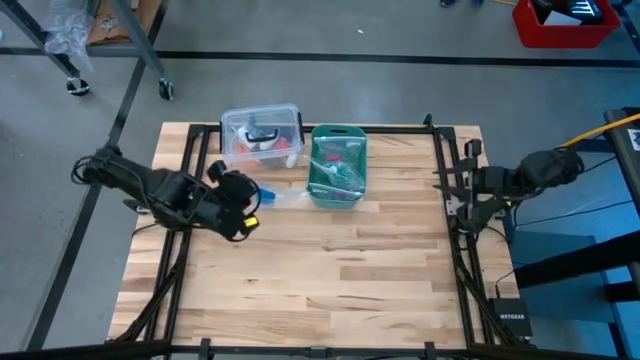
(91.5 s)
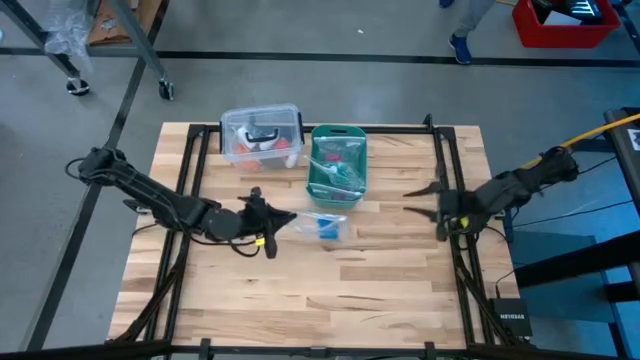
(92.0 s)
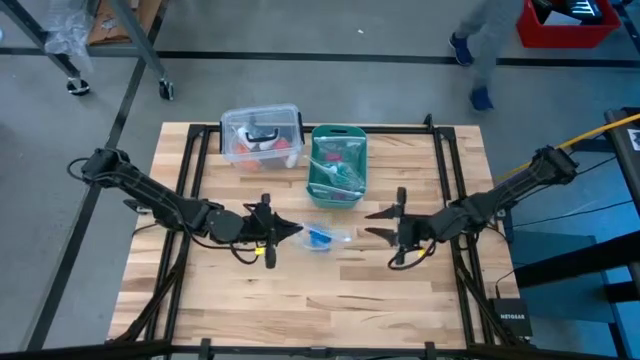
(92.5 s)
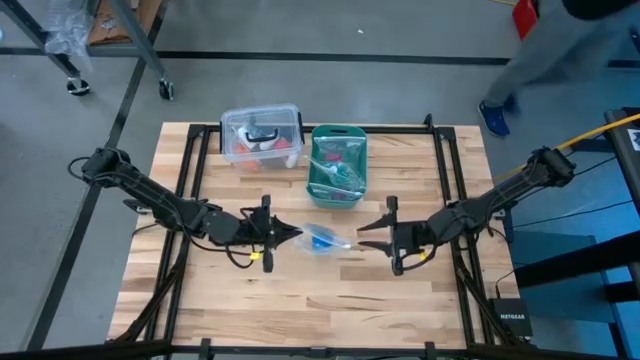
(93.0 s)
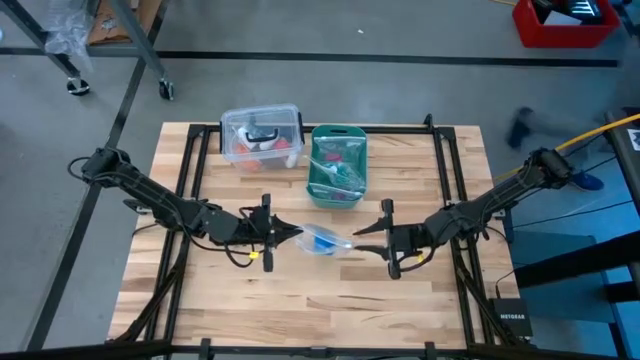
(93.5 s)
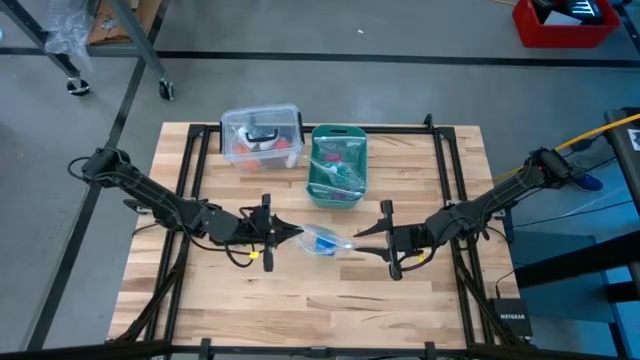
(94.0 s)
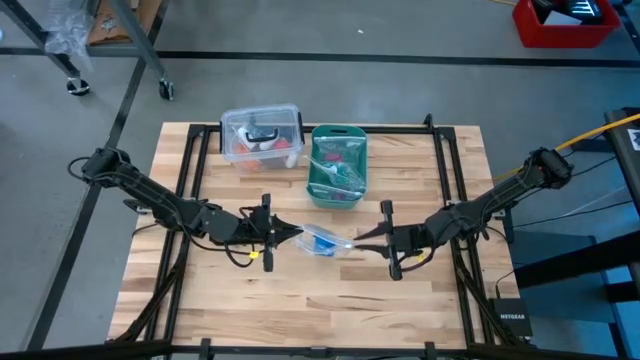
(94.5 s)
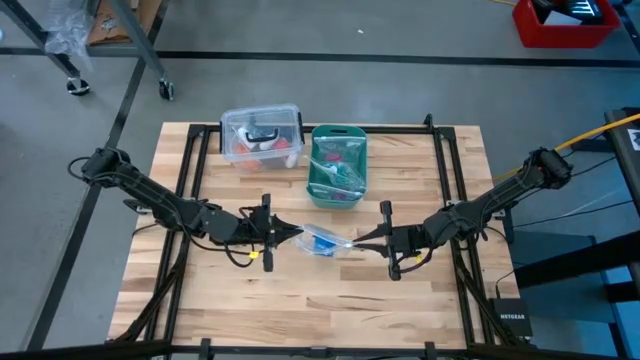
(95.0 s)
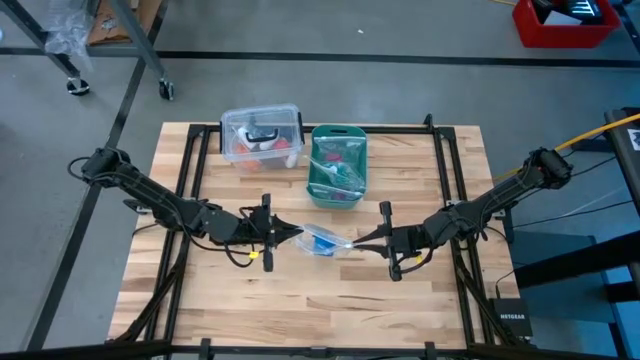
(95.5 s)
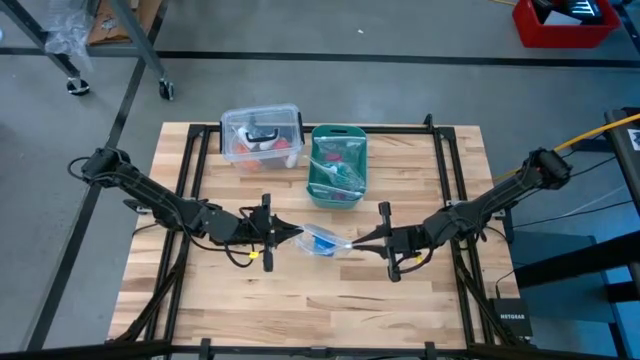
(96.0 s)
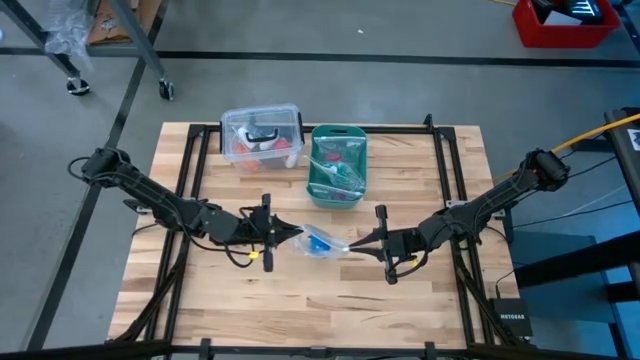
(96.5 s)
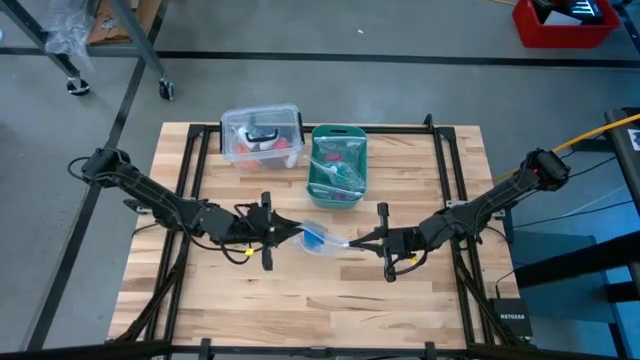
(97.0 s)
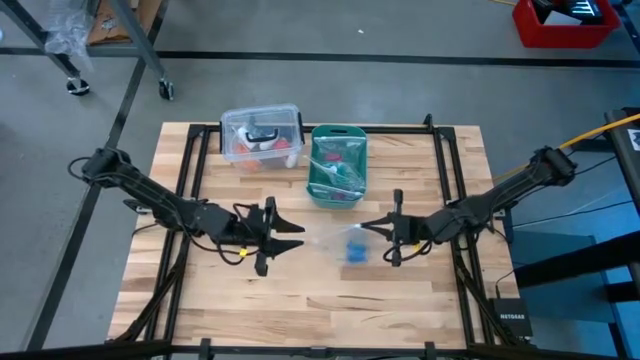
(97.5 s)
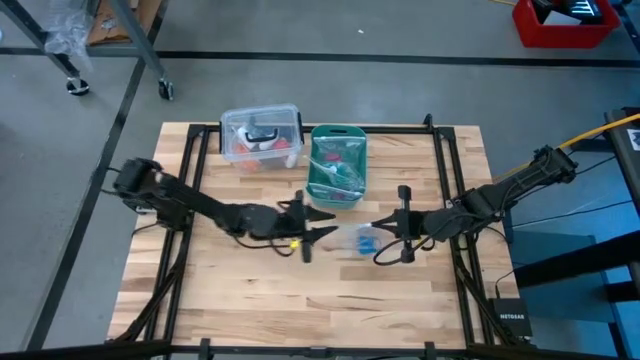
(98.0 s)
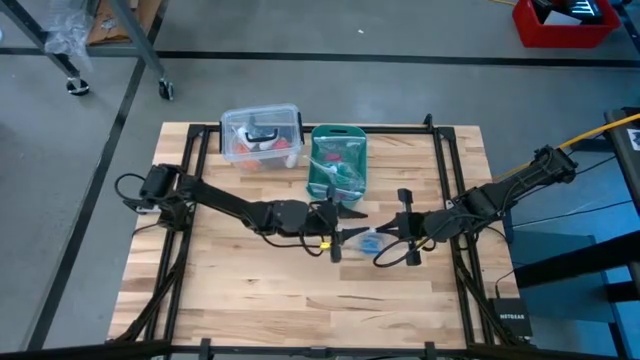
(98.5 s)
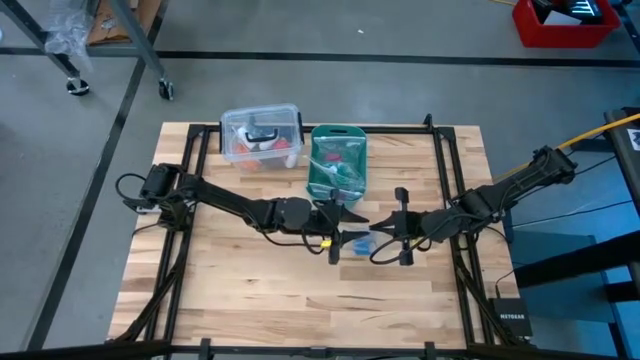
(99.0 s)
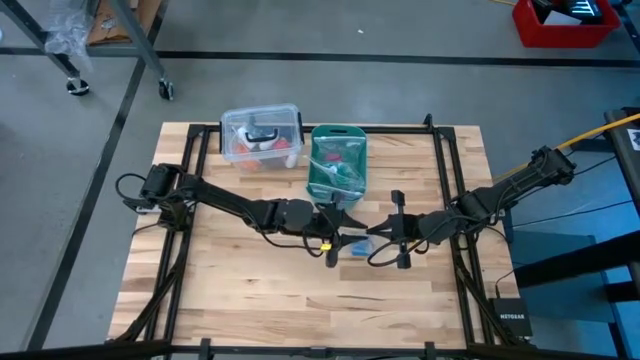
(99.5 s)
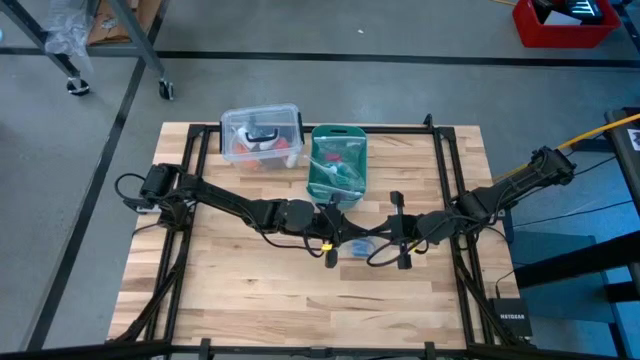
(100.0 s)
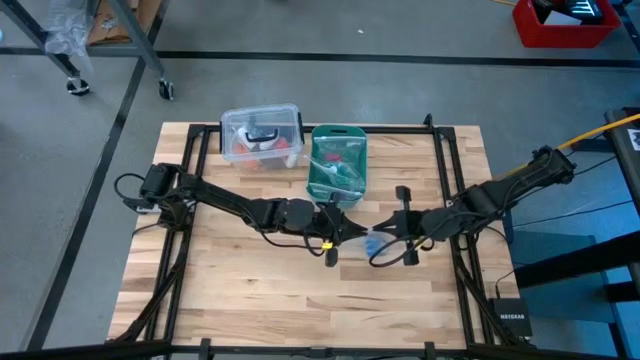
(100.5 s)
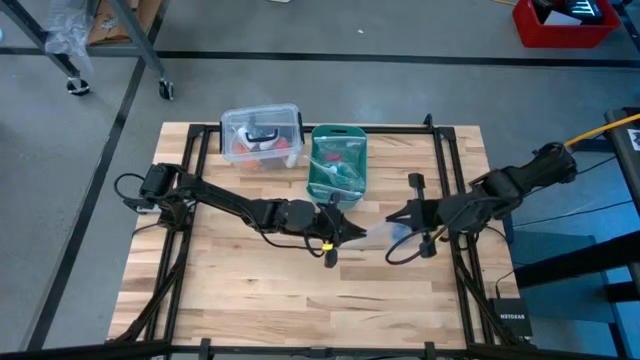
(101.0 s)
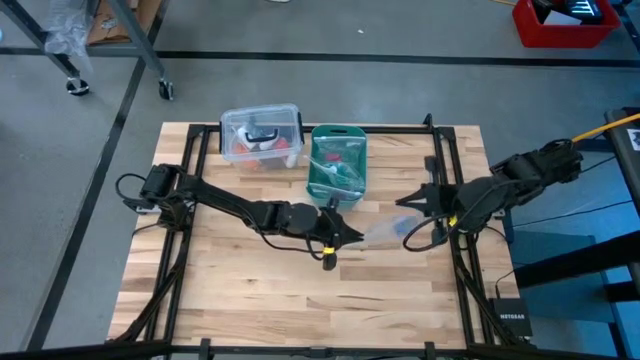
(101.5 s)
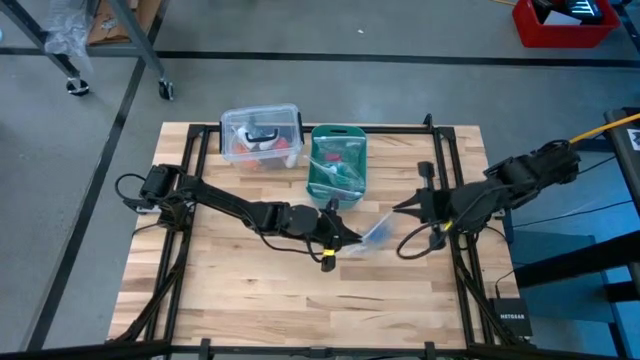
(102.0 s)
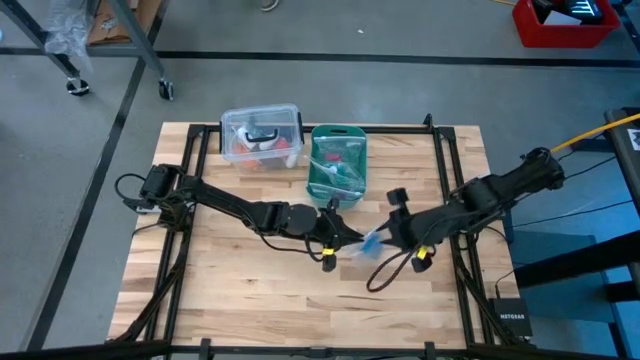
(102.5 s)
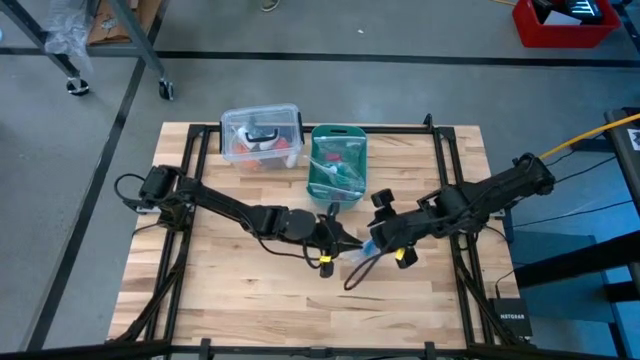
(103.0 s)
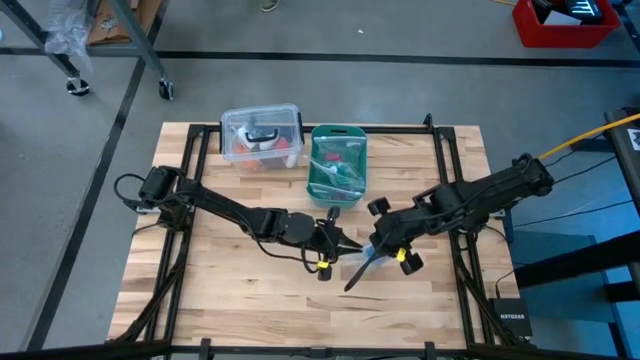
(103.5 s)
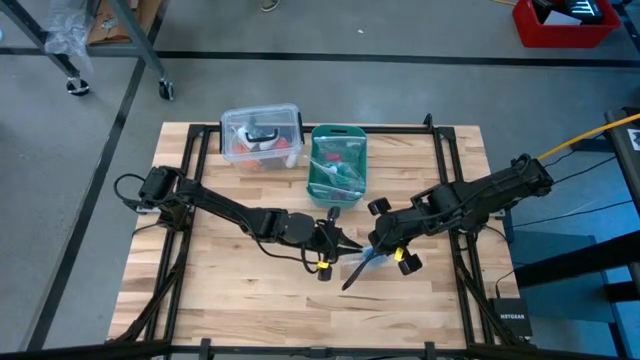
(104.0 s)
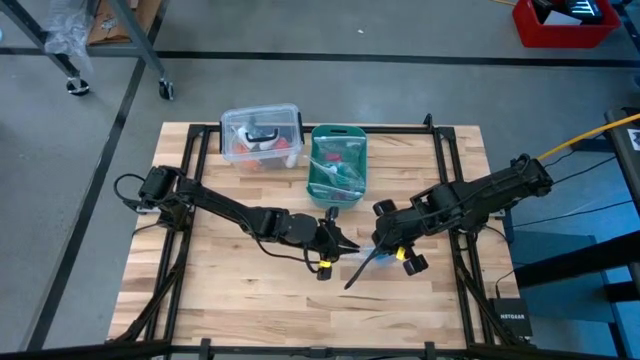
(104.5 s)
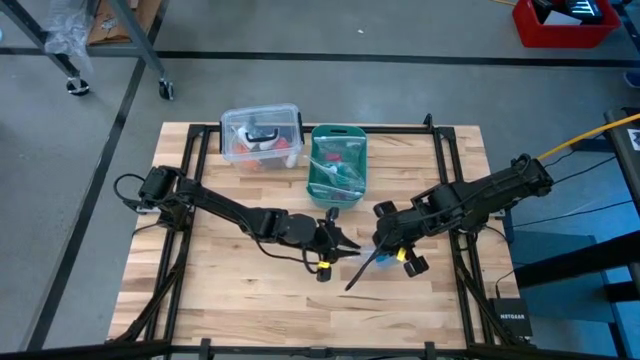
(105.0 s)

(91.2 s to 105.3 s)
Task: Roll bandage
Close the transparent zip bag

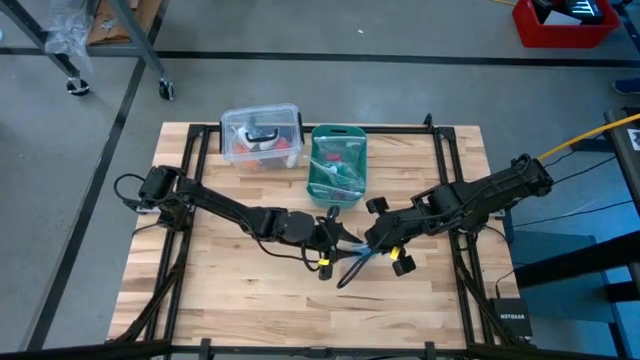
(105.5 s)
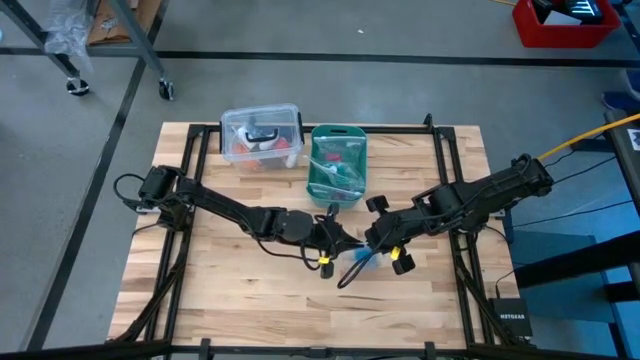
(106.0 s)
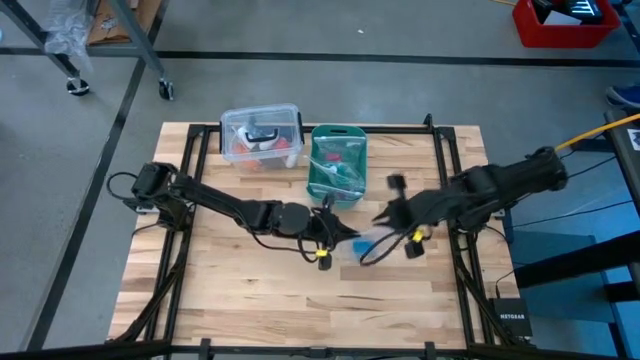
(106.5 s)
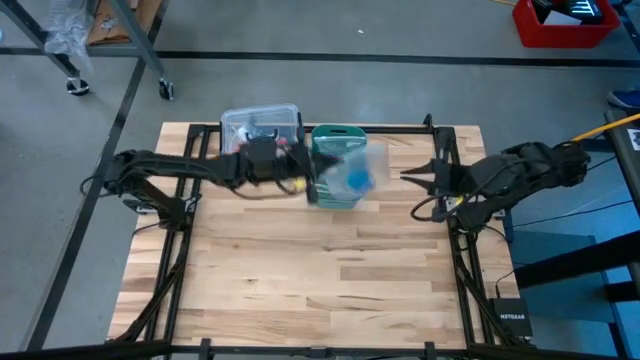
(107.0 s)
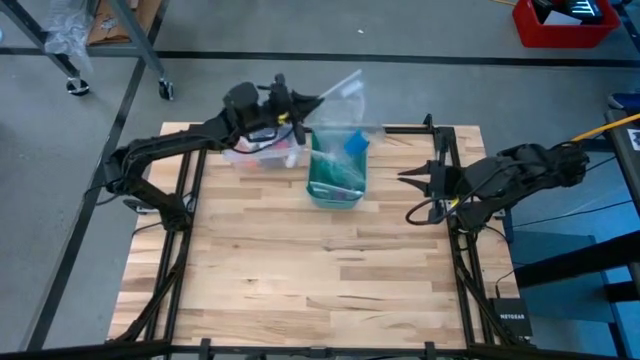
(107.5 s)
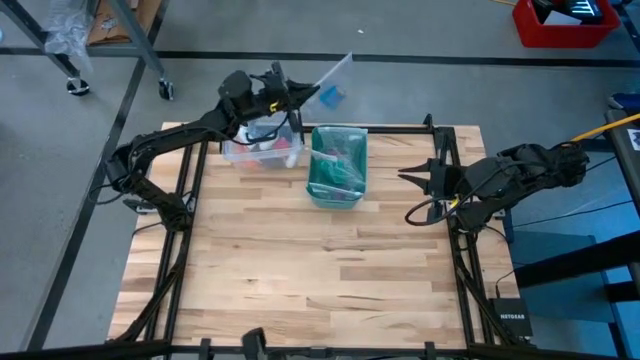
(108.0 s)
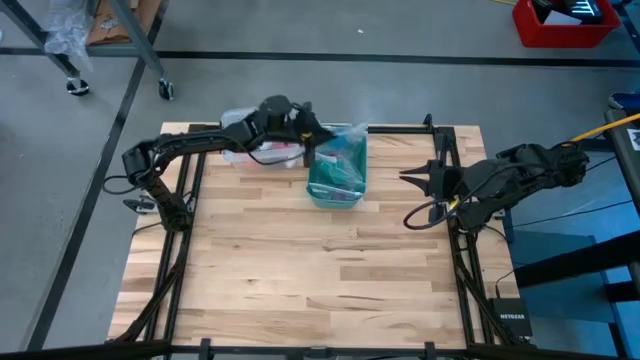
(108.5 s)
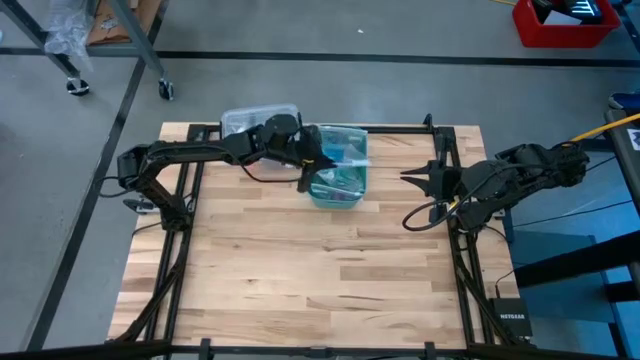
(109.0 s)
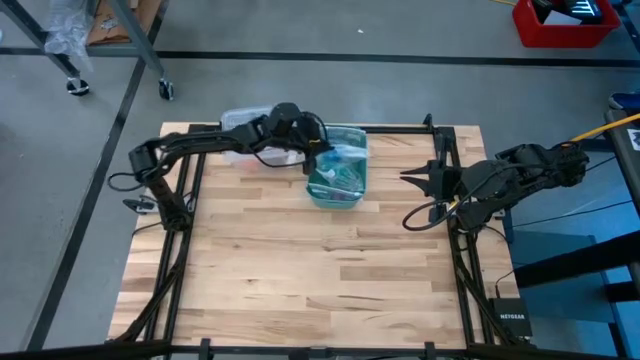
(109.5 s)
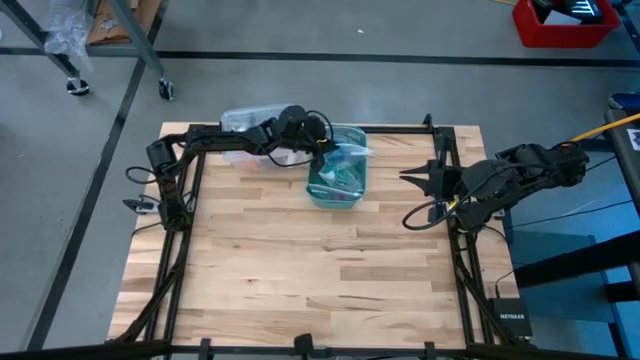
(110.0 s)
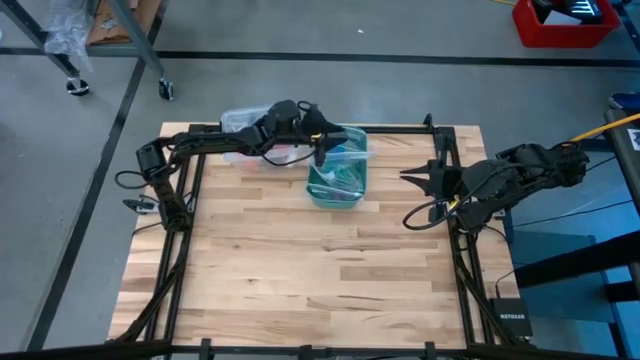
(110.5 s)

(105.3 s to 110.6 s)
Put the transparent zip bag into the green container

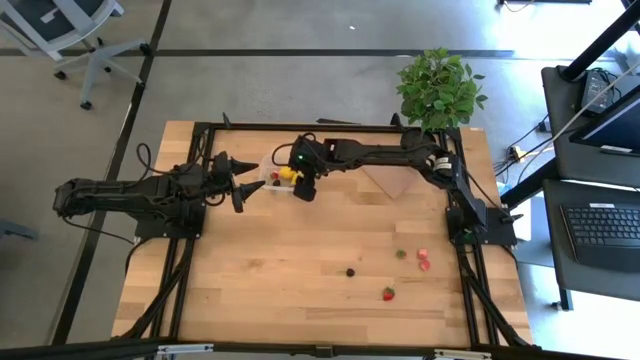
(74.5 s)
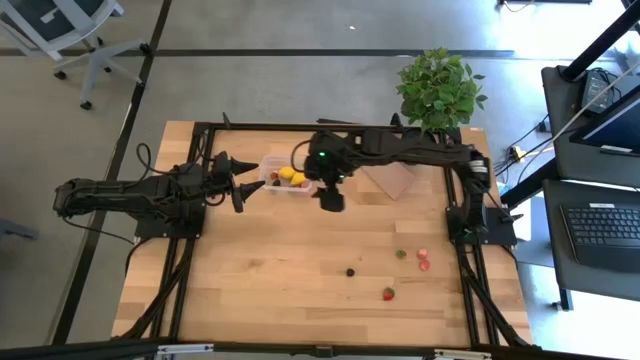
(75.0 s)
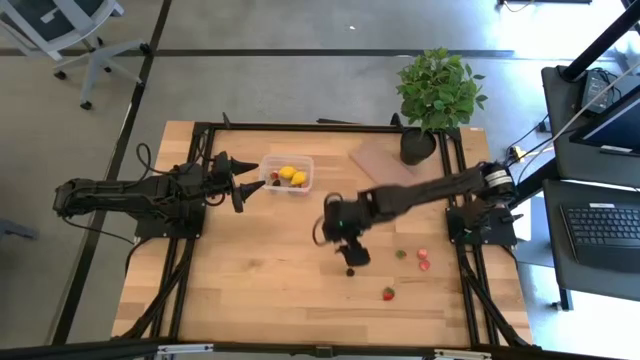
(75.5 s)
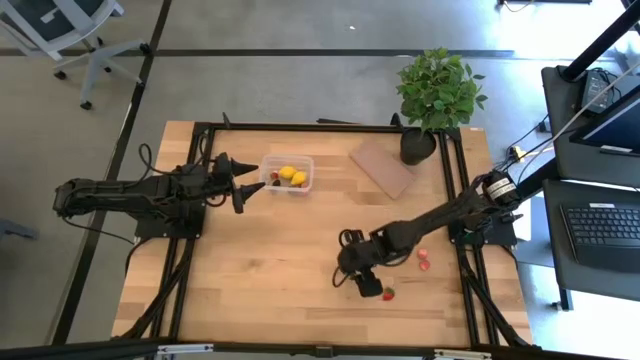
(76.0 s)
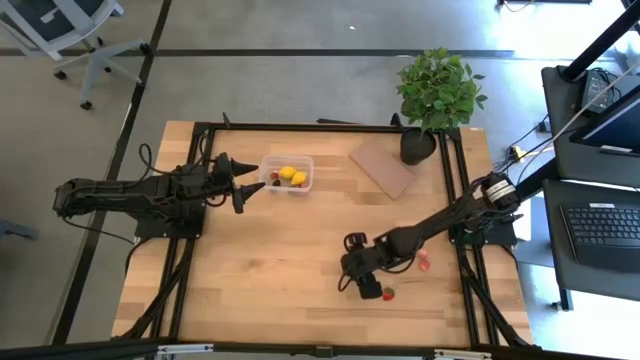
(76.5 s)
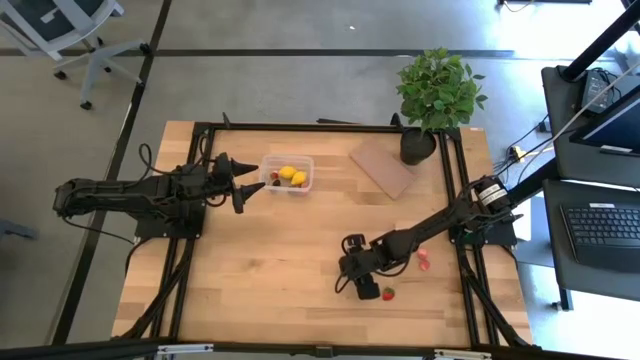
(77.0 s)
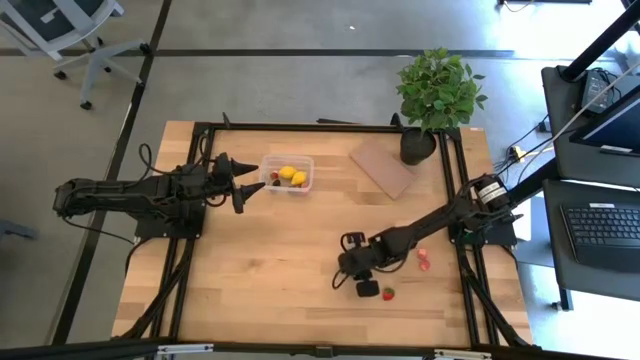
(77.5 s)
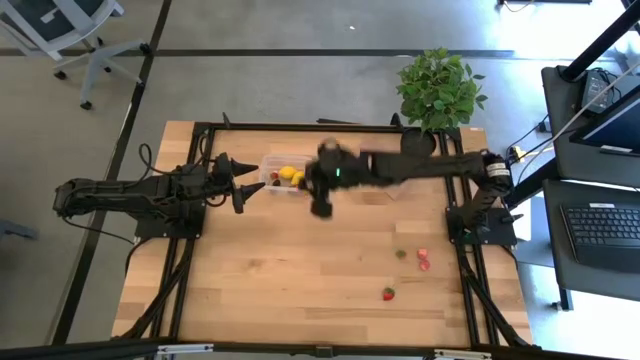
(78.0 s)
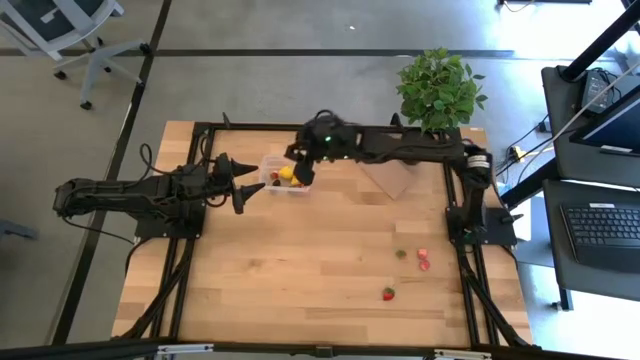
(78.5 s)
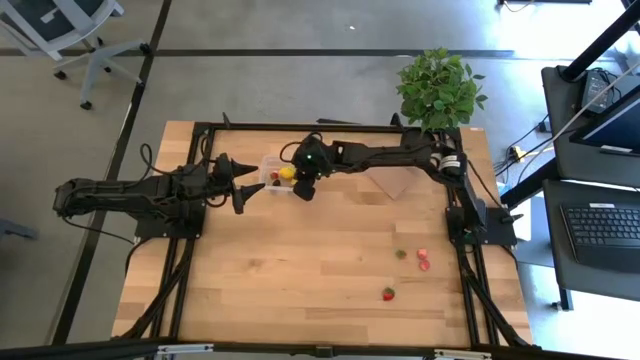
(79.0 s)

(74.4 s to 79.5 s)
Task: Pick and placing Produce into tupperware
Put the black cherry into the transparent bin
